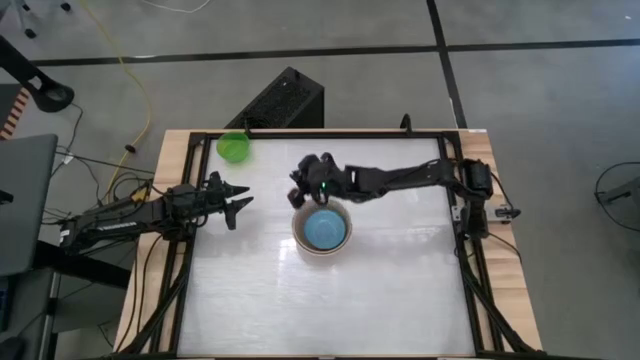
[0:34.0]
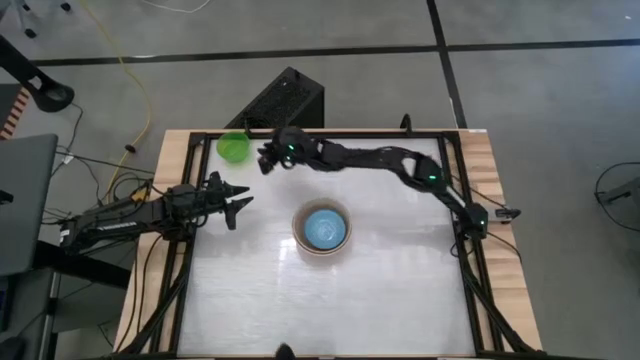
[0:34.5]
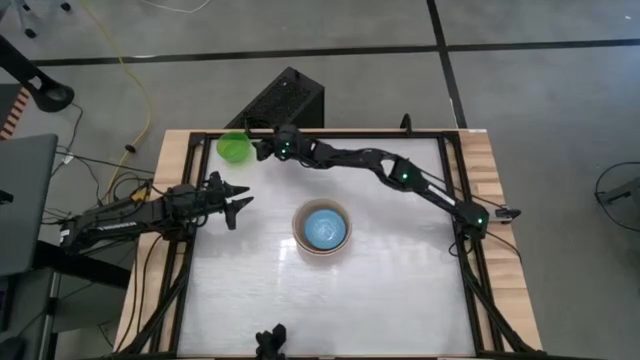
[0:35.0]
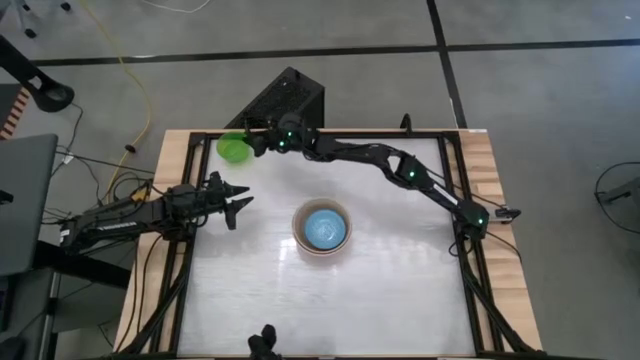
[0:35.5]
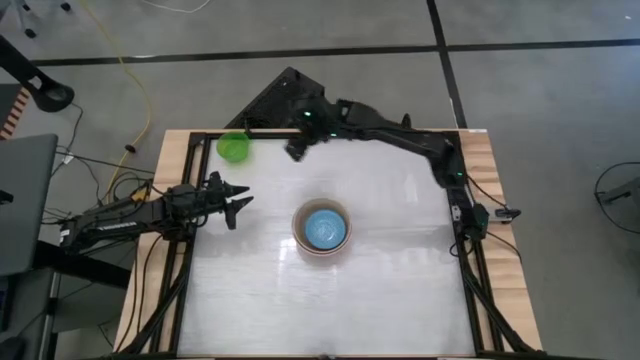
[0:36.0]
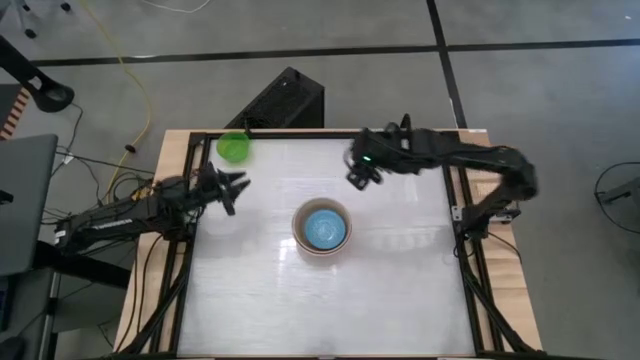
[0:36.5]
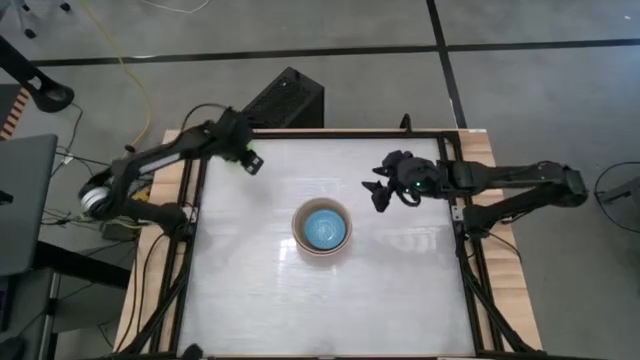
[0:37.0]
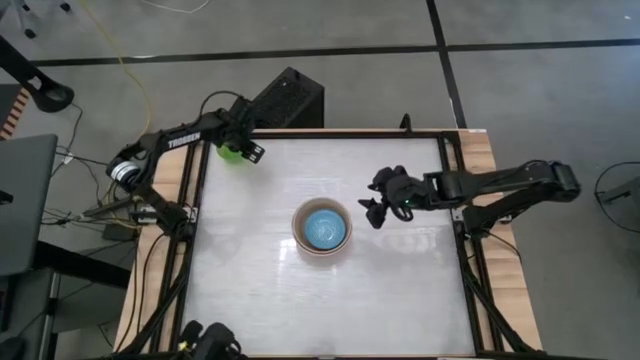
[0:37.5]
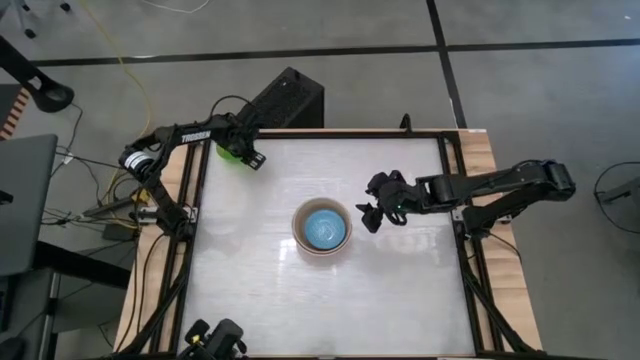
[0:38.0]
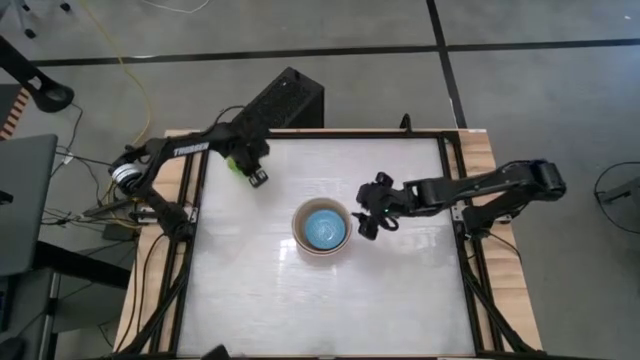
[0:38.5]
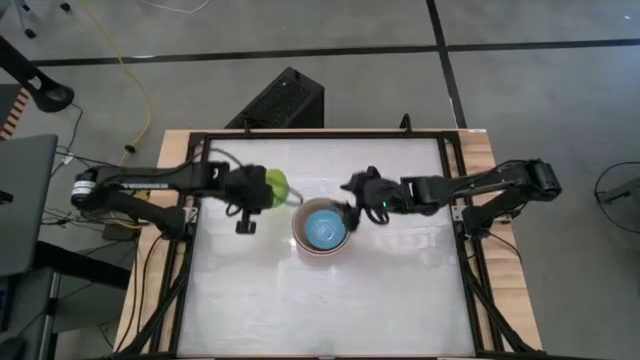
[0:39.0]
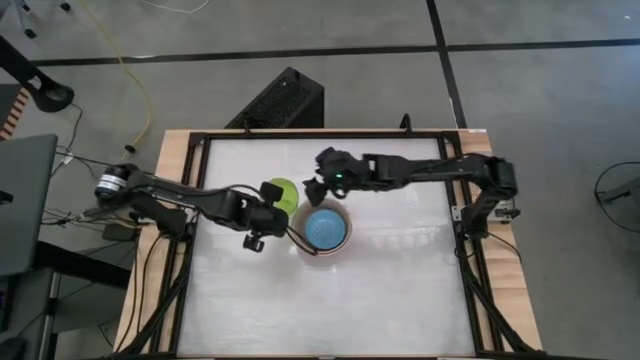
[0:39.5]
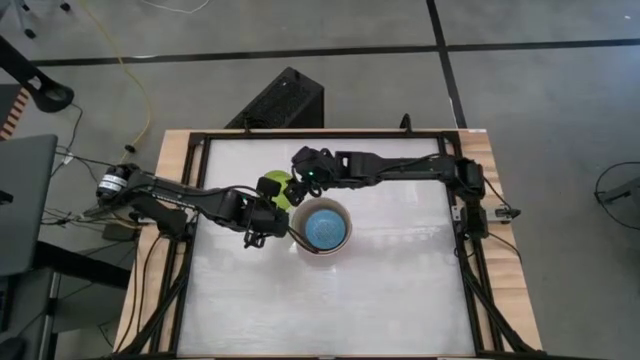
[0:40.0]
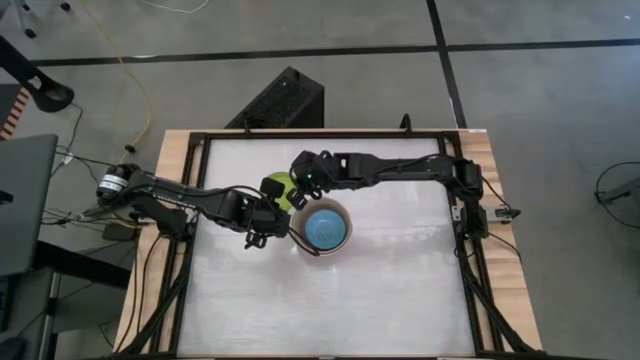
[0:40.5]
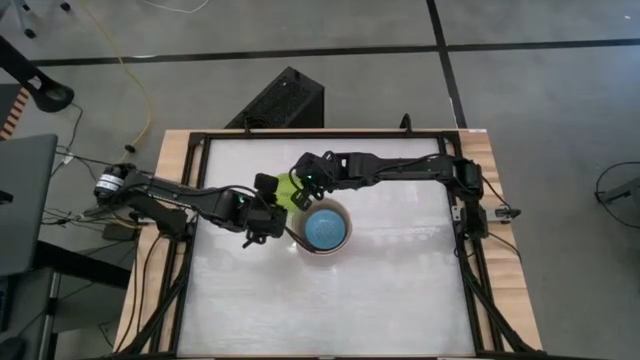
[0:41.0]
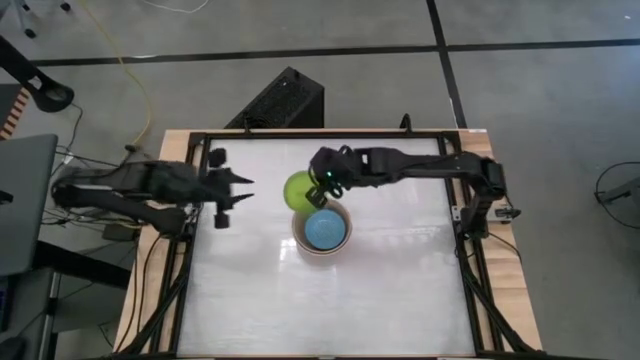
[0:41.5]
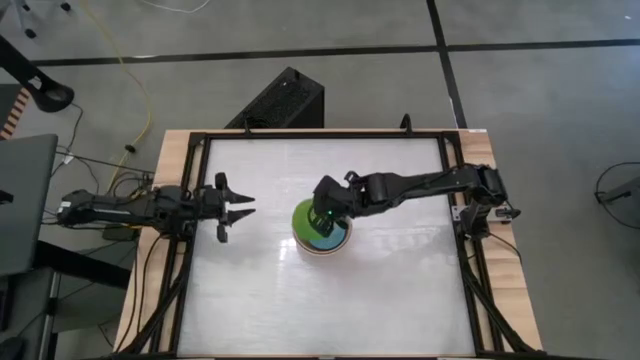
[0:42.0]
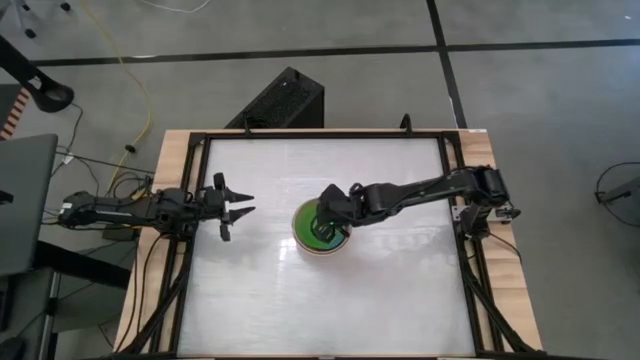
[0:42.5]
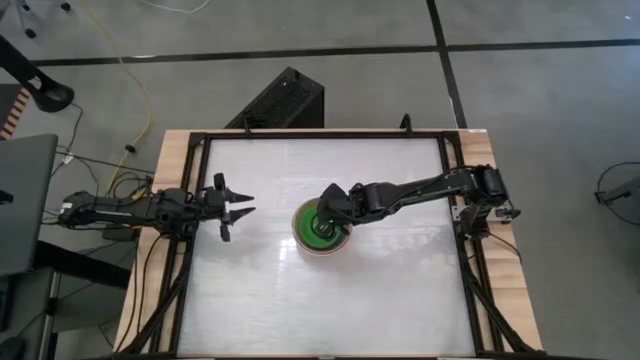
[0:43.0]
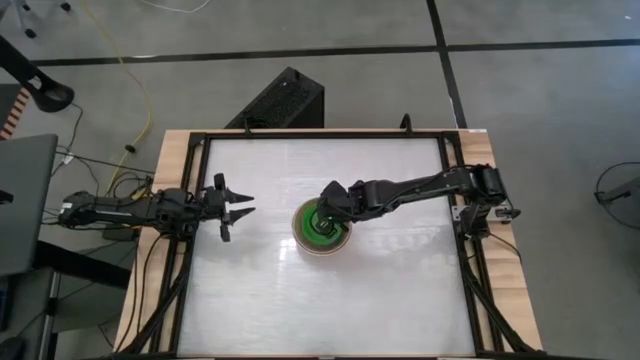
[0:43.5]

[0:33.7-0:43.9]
Stack the green bowl on top of the blue bowl

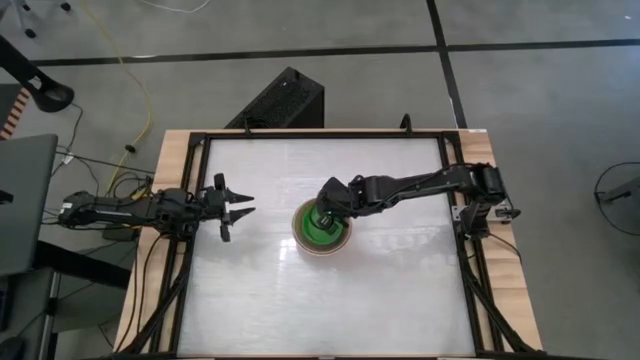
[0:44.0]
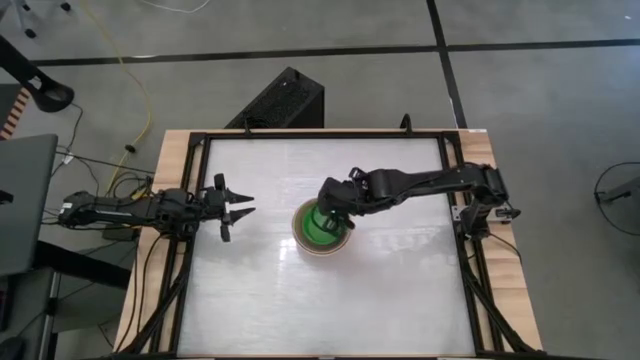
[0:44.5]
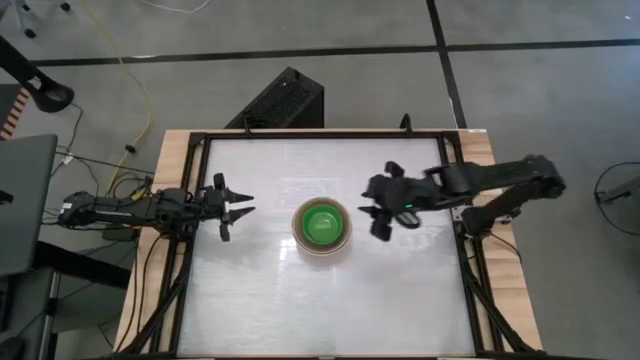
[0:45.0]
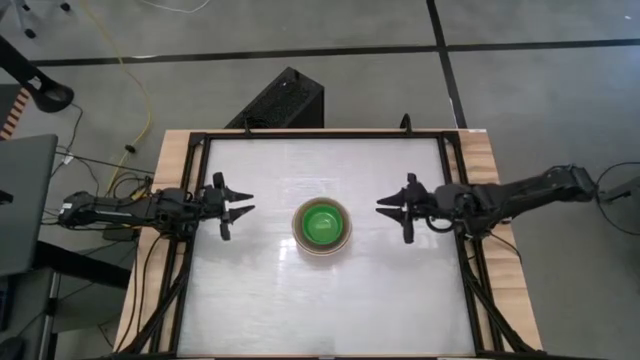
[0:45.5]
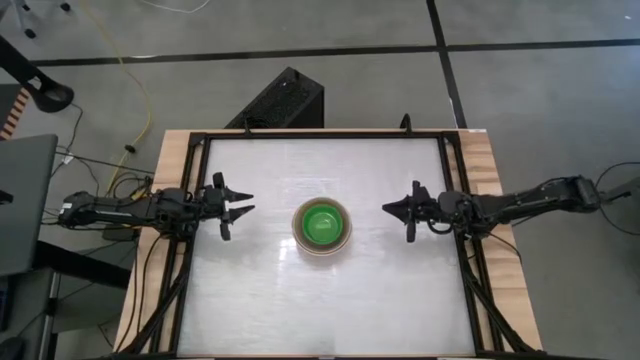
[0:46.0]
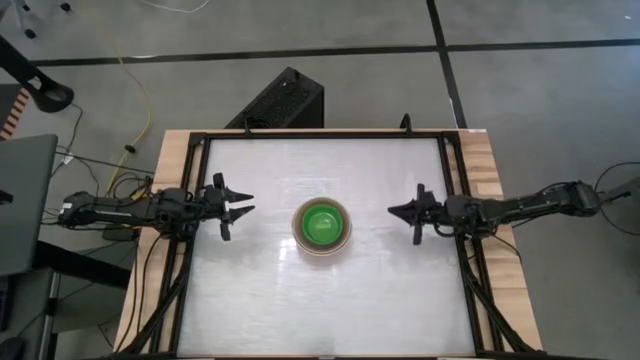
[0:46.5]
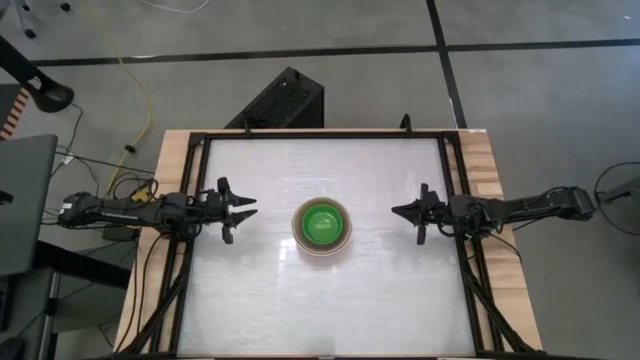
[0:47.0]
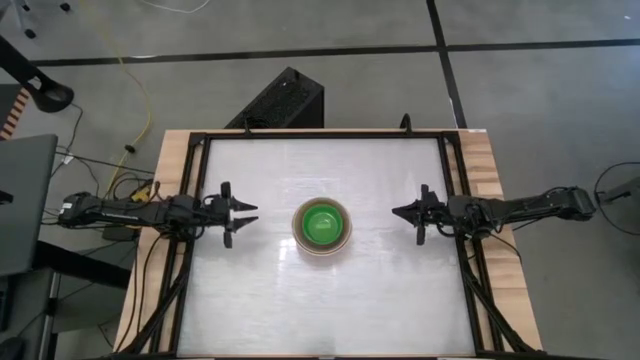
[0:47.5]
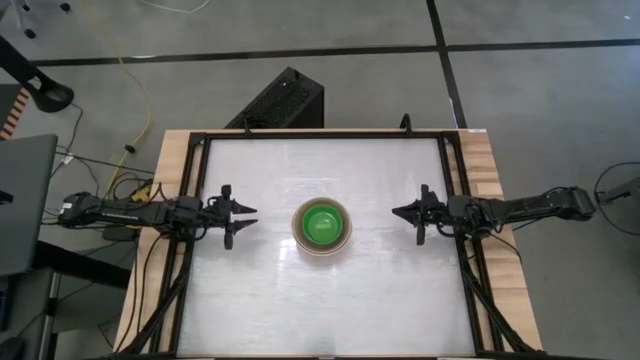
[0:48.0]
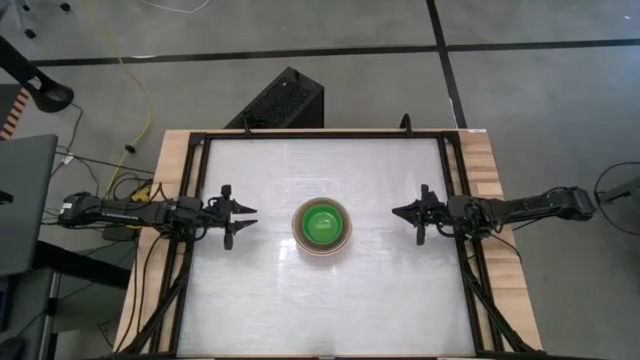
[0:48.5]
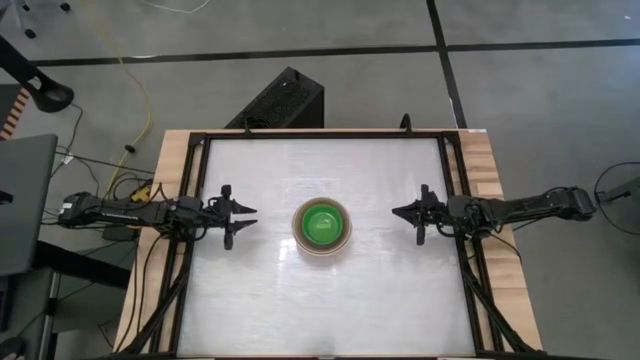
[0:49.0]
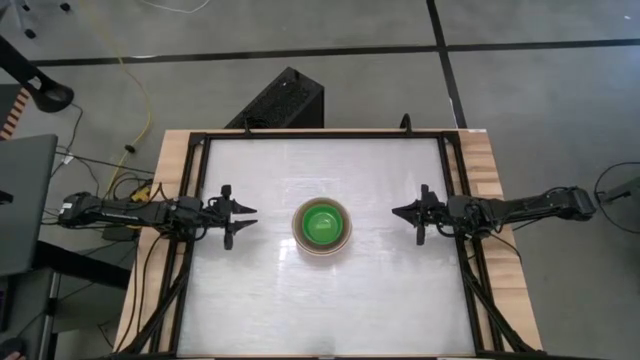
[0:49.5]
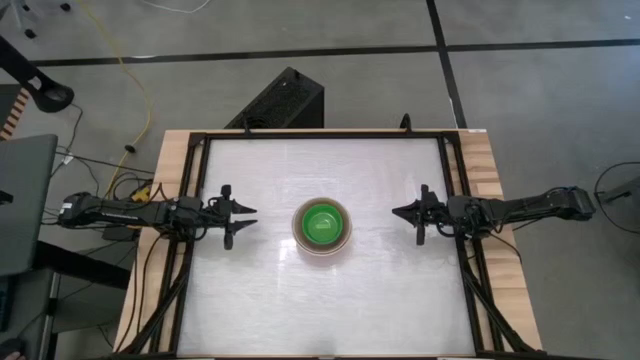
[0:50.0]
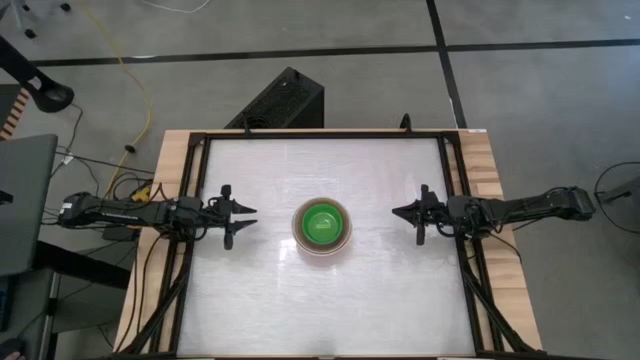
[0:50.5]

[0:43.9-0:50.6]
Return to Home Position
